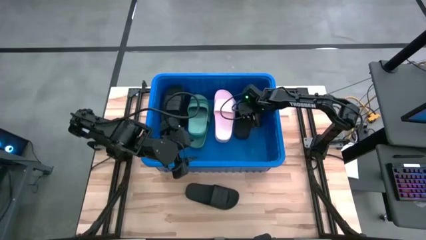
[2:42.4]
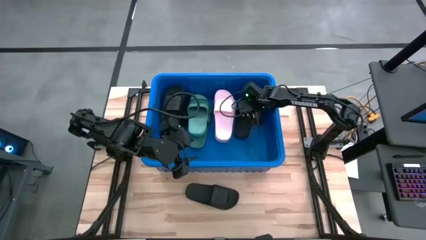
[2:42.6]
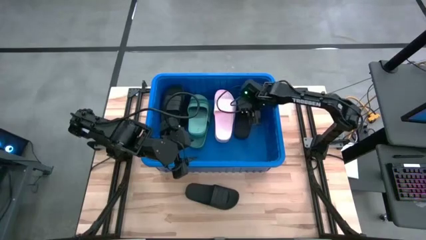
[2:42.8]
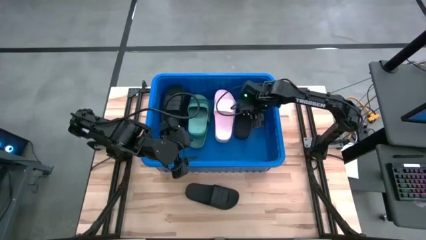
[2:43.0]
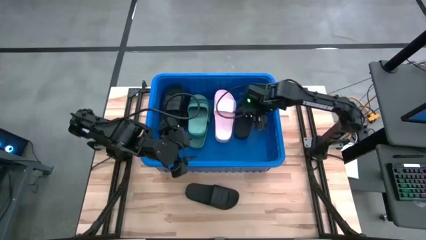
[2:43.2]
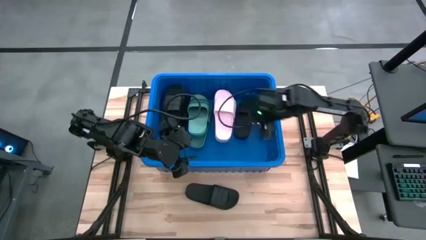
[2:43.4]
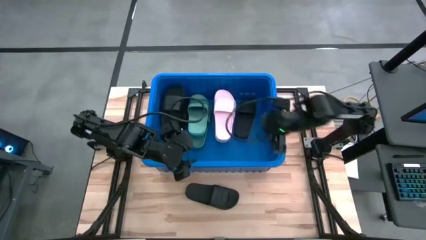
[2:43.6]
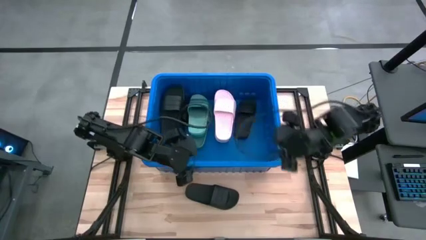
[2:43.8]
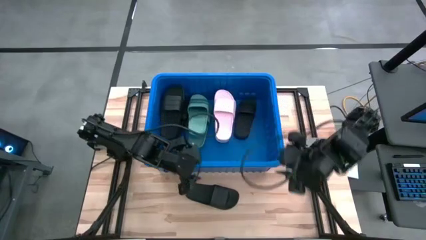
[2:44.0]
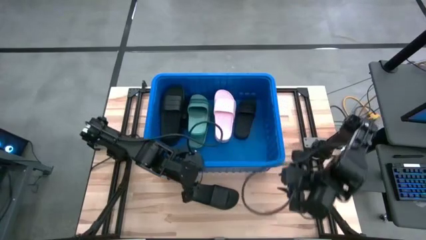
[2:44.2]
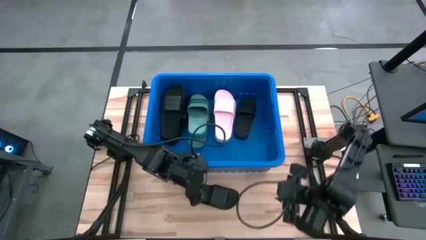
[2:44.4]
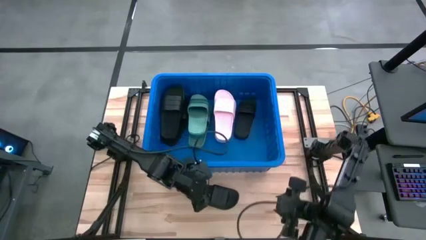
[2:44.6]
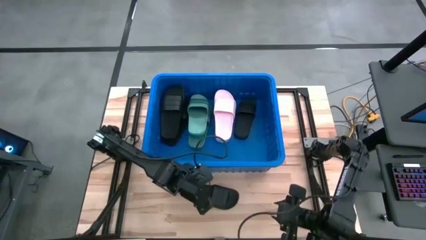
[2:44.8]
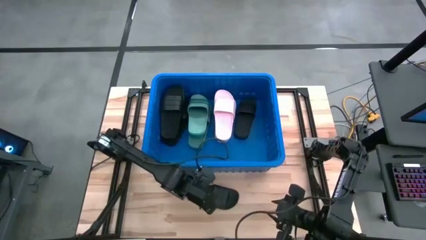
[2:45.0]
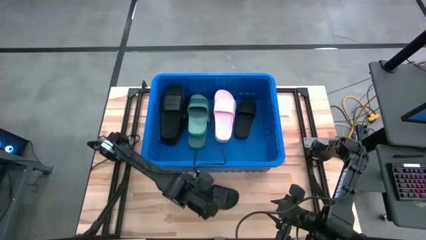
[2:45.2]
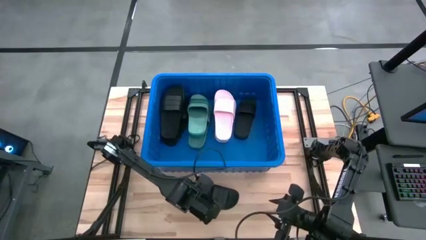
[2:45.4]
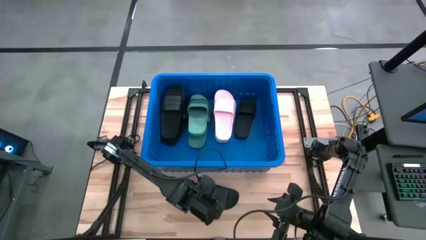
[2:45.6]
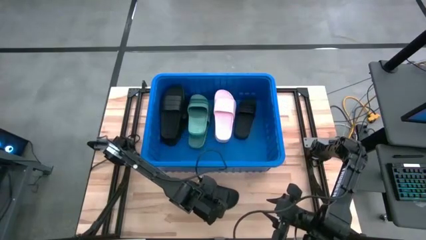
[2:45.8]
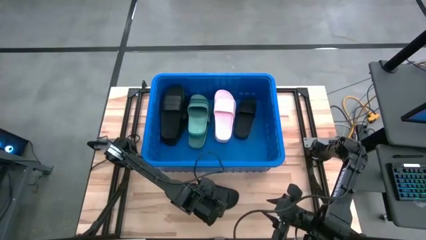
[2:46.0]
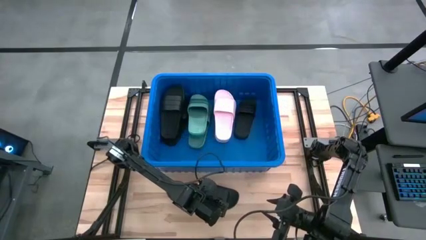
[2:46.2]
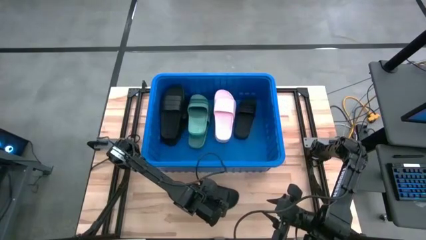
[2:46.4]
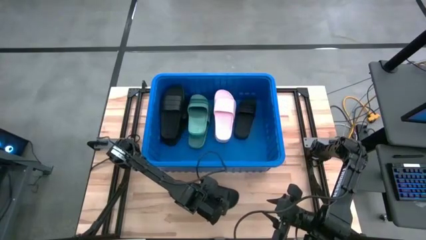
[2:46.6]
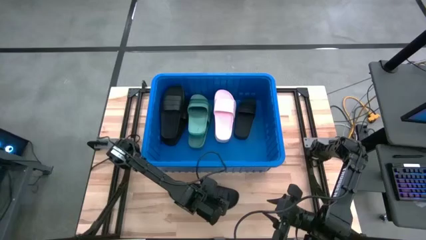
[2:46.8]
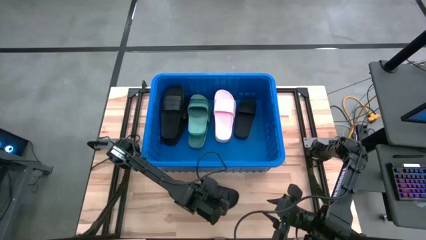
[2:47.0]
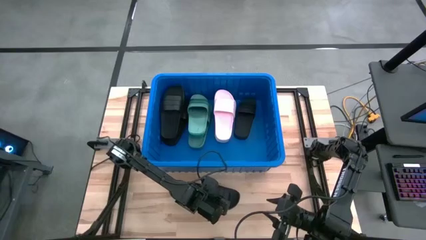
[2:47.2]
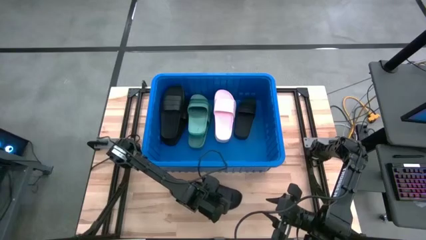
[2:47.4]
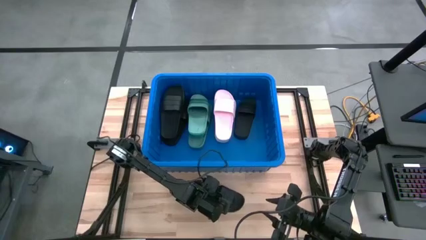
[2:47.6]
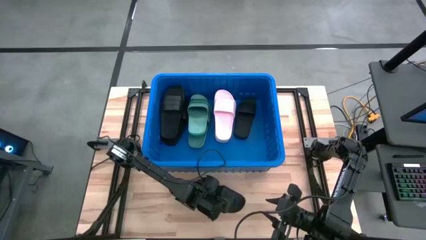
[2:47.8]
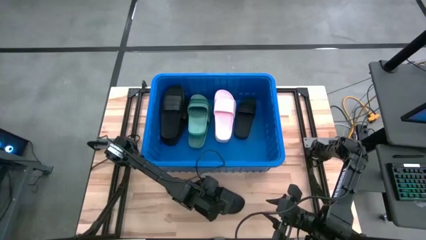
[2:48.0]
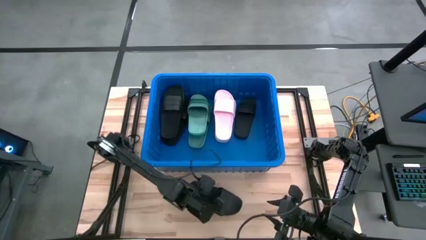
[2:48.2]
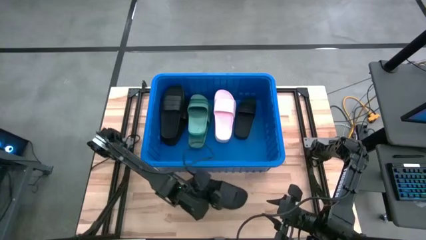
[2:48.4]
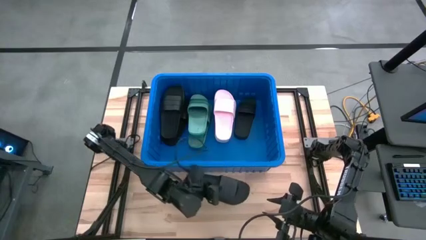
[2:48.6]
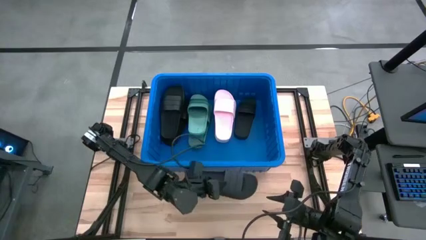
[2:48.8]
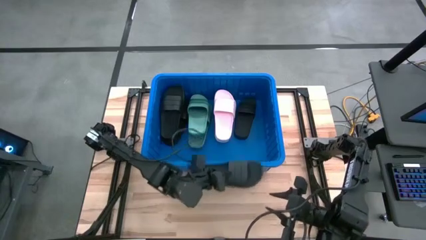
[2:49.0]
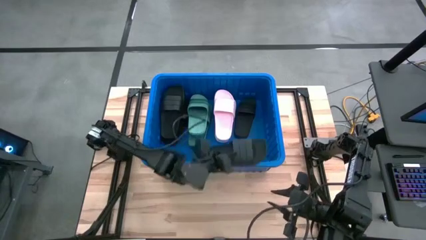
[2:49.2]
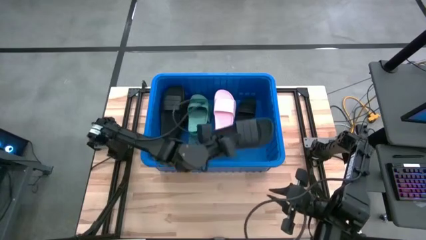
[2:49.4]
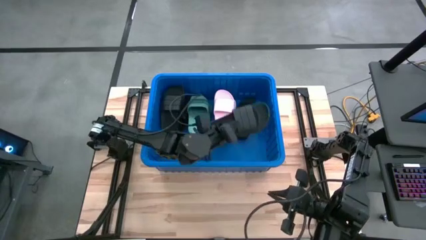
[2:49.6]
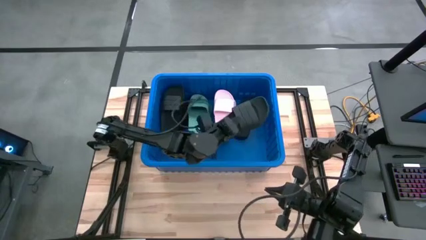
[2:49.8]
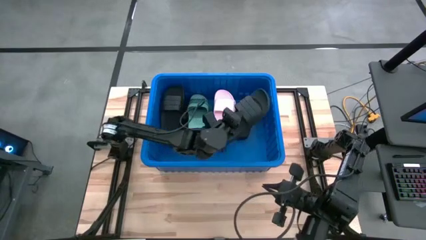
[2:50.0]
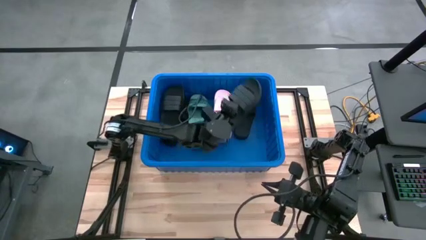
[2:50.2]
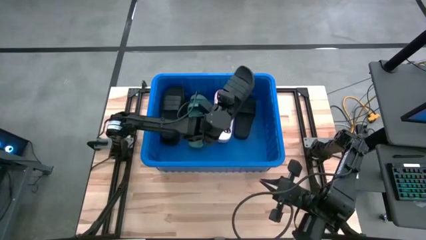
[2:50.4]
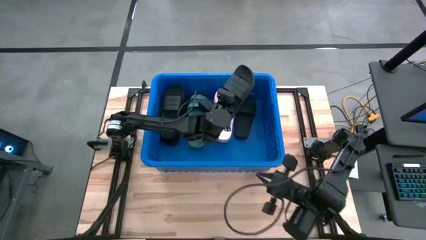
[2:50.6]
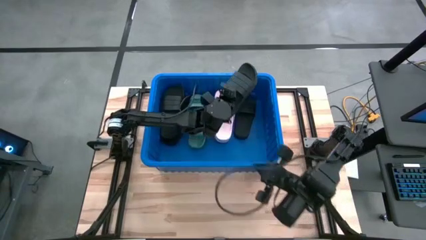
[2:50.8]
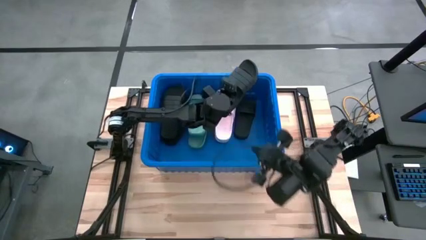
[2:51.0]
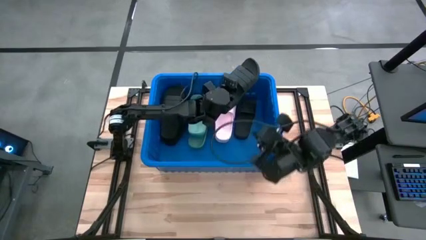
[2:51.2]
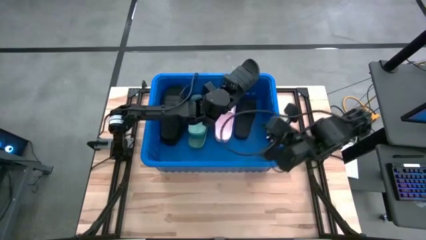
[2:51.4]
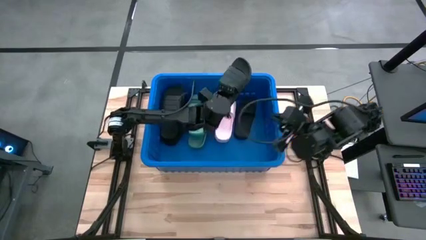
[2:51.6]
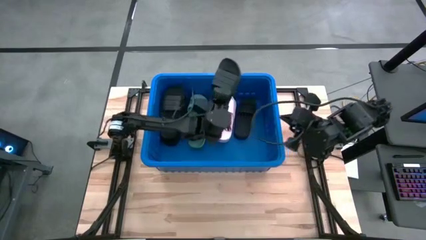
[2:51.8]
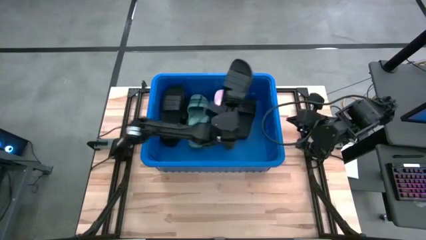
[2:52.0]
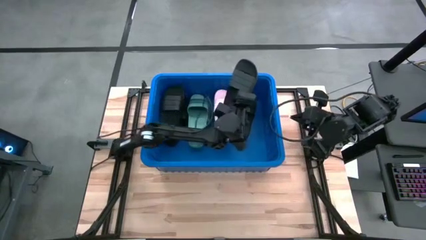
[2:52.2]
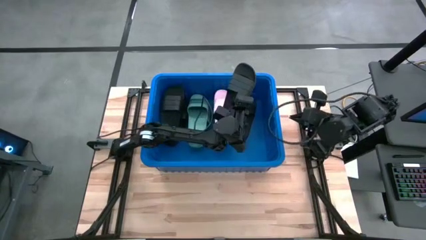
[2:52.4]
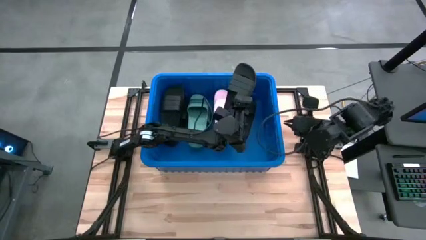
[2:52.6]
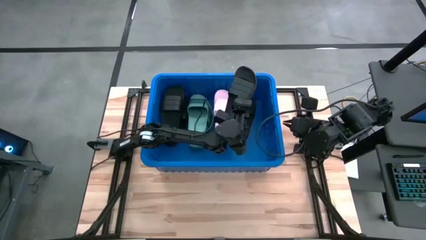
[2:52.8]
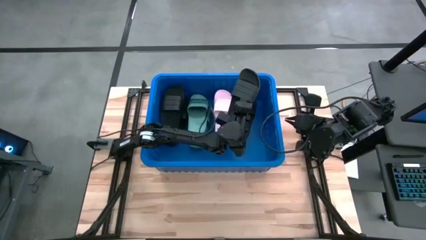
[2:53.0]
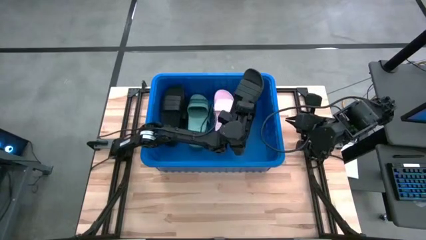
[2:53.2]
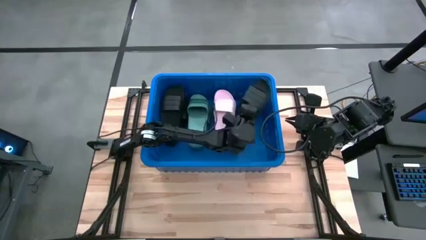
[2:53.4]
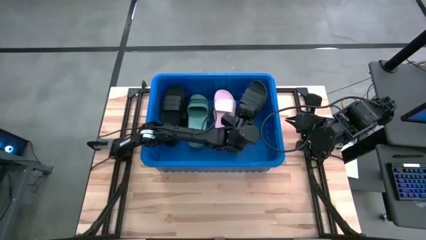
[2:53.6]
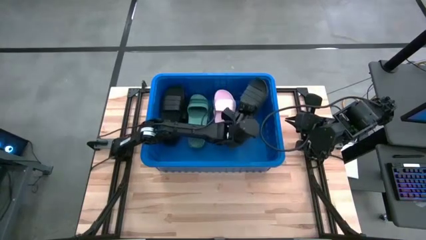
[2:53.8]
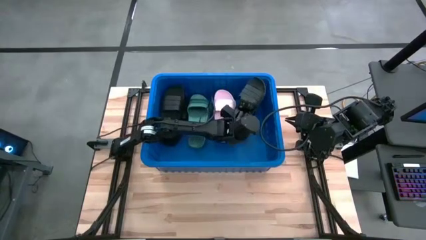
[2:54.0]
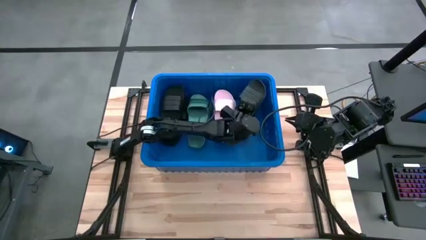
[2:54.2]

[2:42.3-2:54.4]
Task: Pick and place slides into bin
Put the black slipper on the black slipper

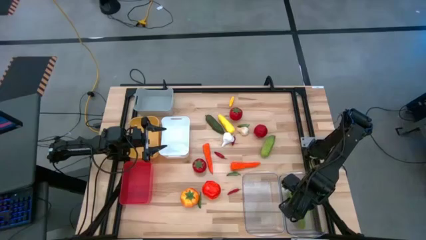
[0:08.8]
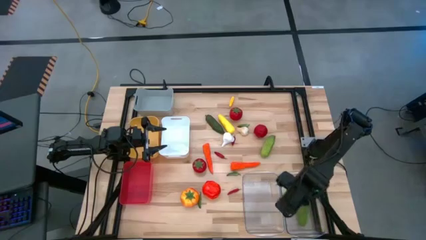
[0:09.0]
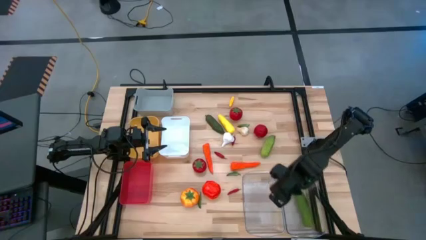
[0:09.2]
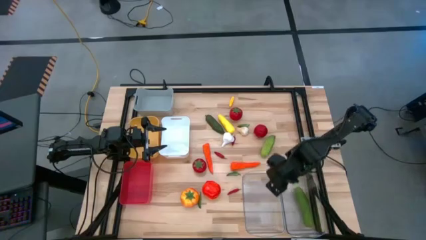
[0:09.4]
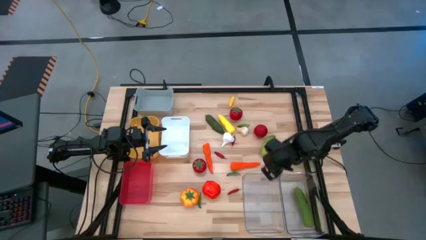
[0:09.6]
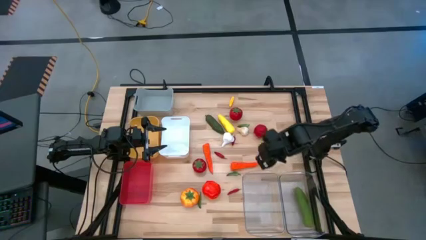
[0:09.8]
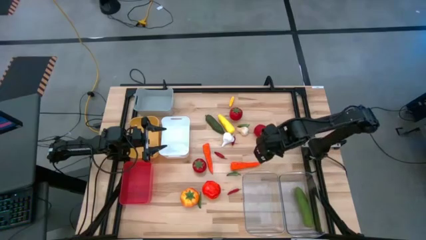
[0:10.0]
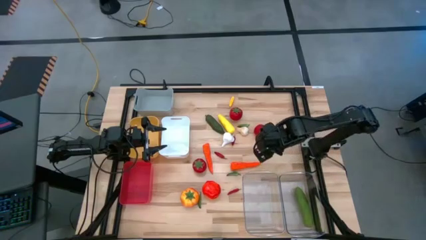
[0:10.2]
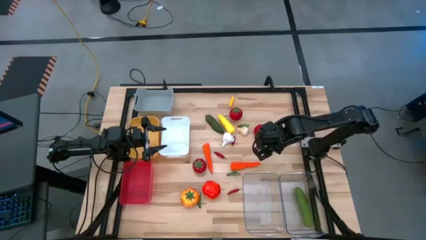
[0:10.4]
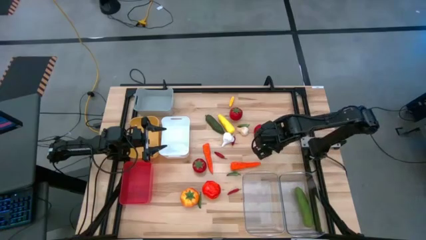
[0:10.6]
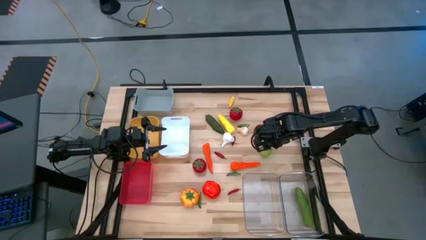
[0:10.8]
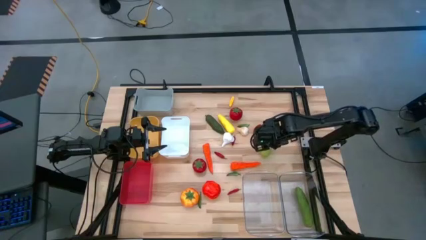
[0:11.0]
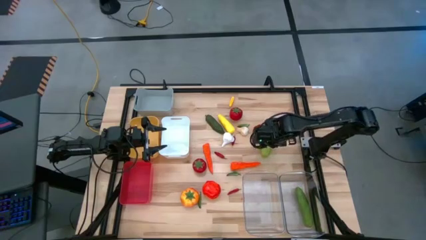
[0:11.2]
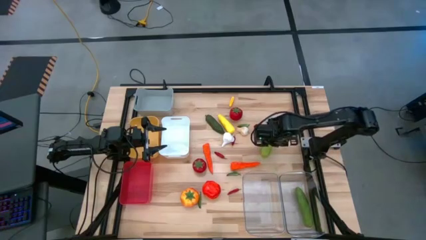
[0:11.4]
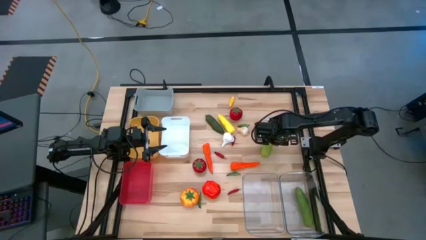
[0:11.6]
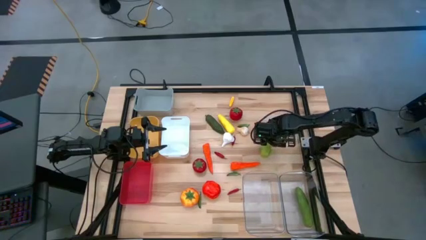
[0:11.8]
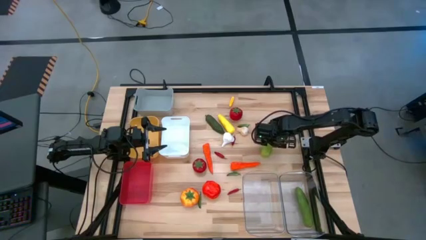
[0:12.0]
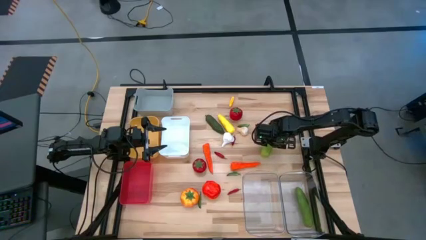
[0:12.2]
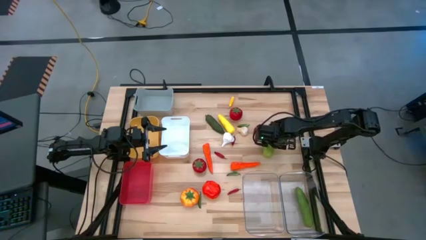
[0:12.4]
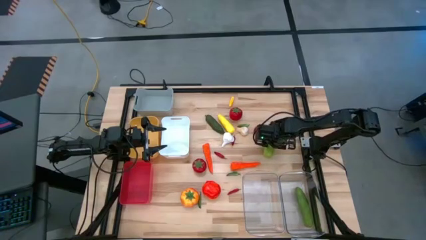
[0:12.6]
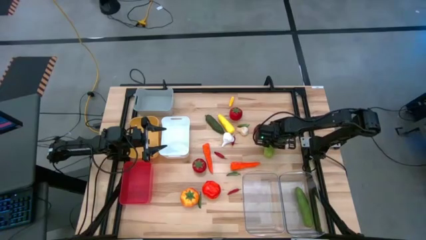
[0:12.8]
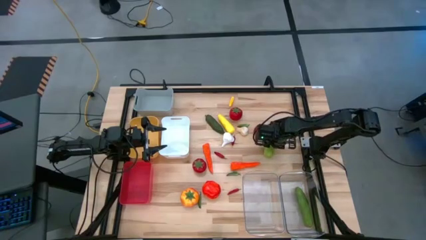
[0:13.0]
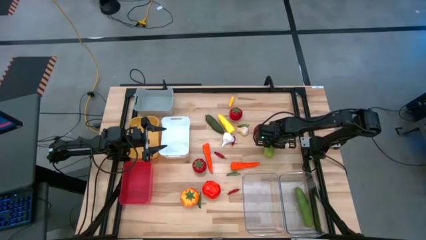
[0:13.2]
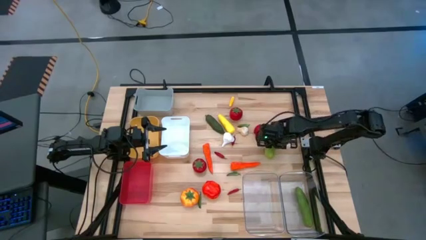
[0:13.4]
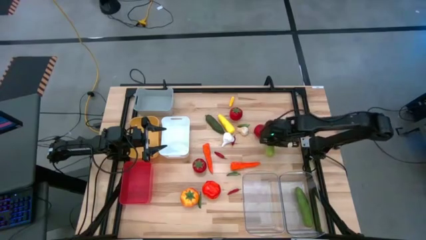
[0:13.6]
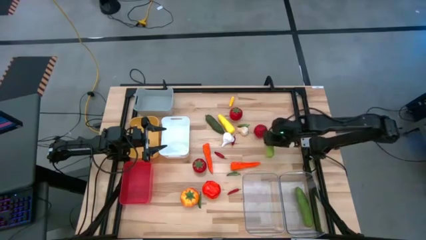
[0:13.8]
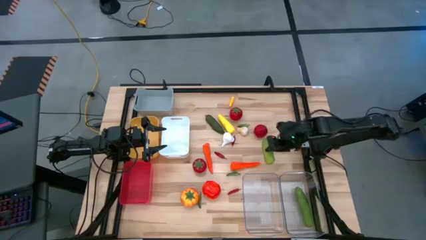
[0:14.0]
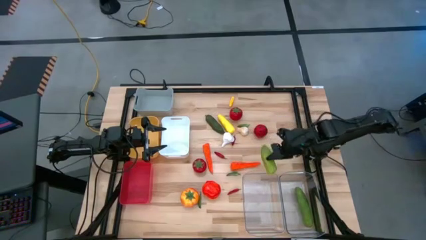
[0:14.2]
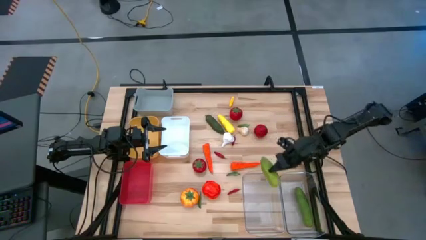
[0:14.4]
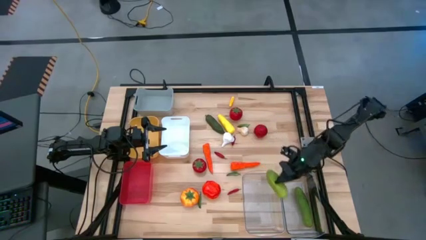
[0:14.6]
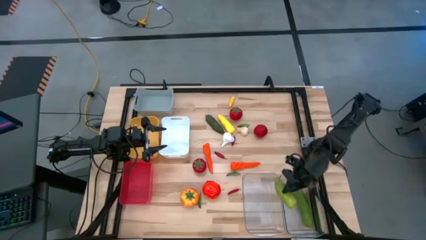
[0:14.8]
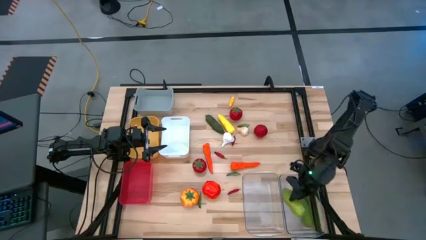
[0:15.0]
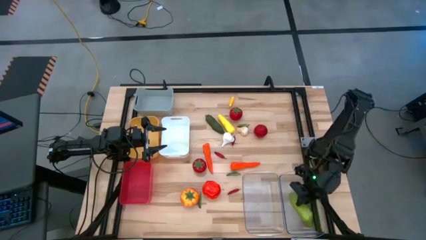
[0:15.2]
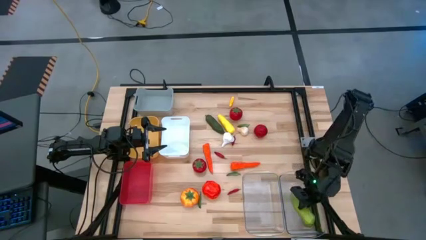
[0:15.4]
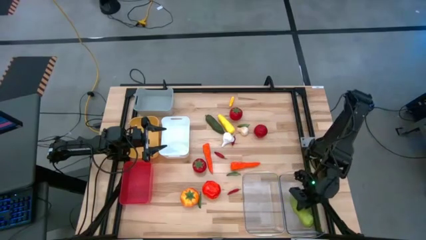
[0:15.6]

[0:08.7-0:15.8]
Task: Sort produce into baskets
Put the green cucumber into the right transparent bin
